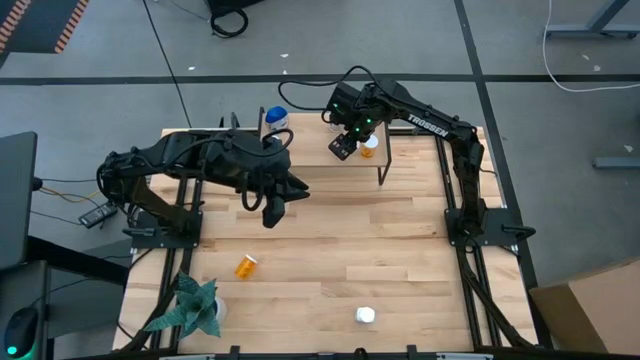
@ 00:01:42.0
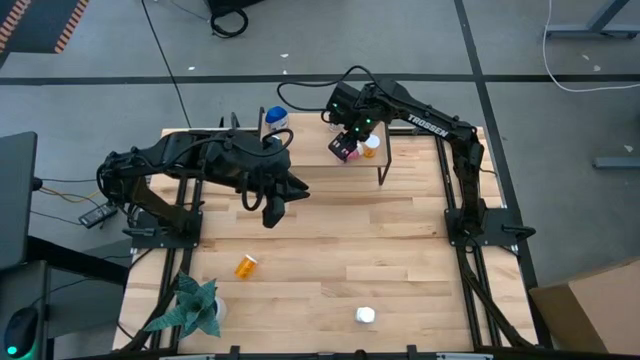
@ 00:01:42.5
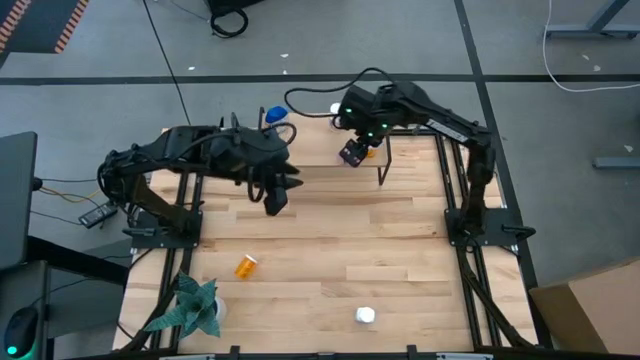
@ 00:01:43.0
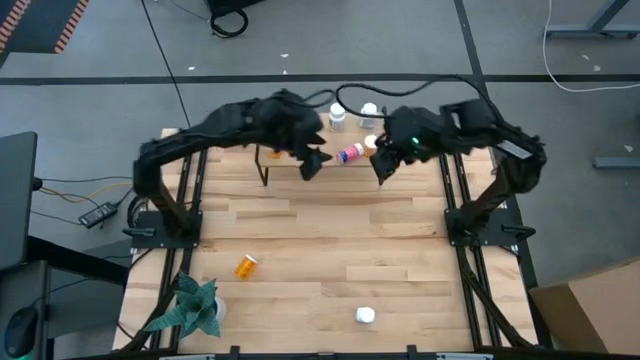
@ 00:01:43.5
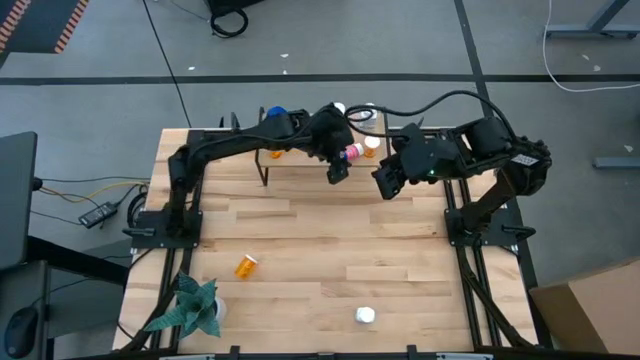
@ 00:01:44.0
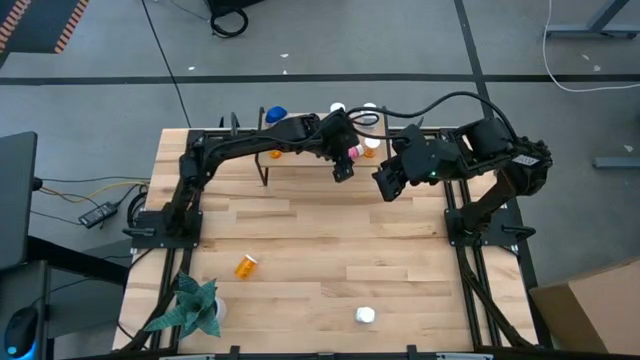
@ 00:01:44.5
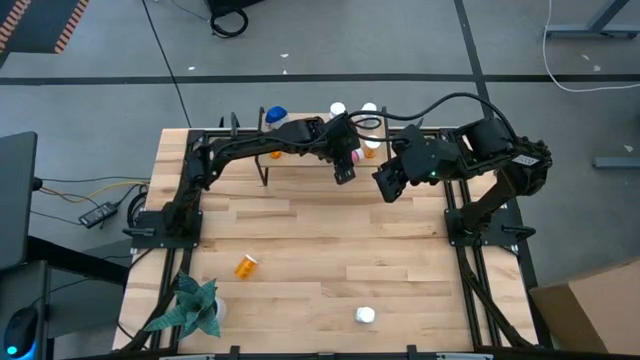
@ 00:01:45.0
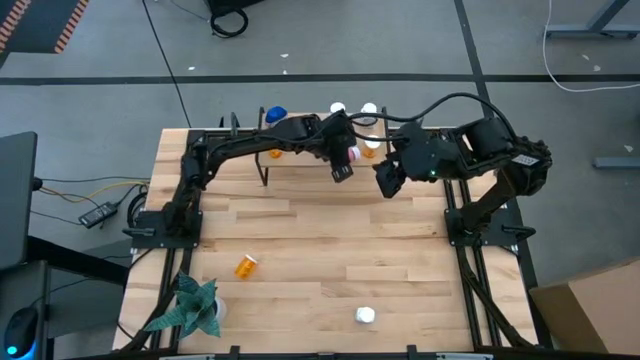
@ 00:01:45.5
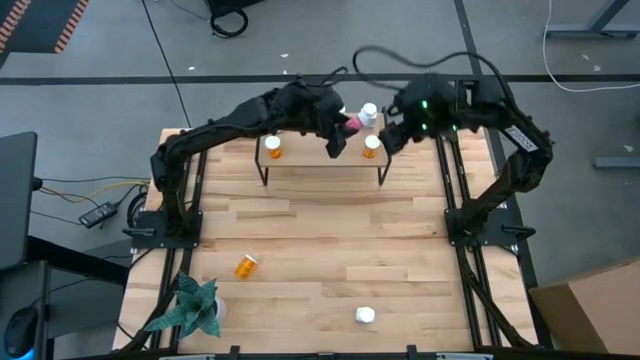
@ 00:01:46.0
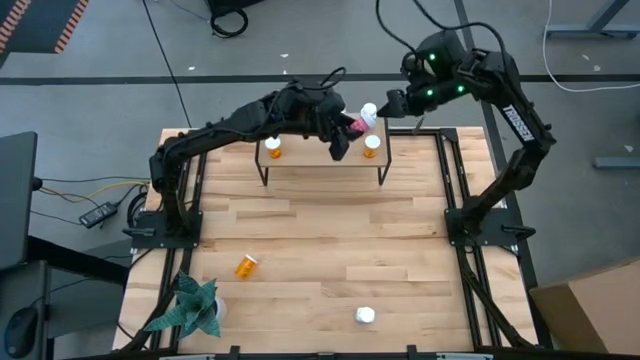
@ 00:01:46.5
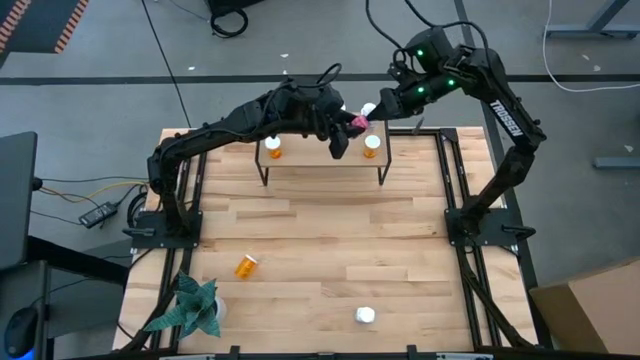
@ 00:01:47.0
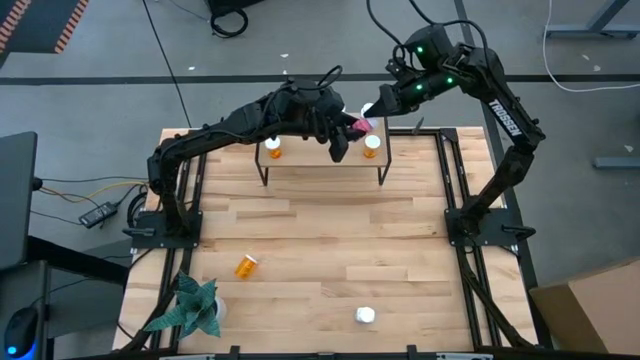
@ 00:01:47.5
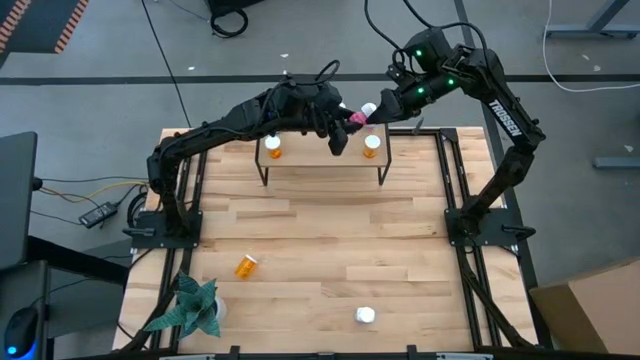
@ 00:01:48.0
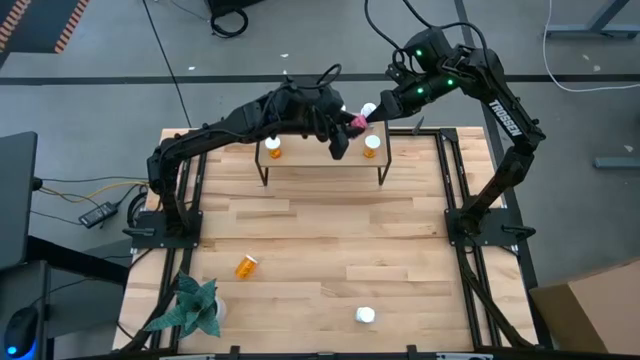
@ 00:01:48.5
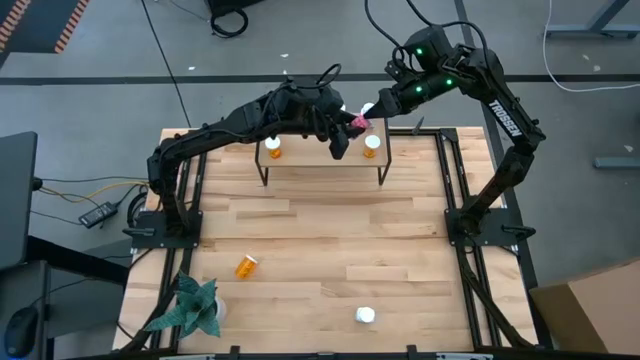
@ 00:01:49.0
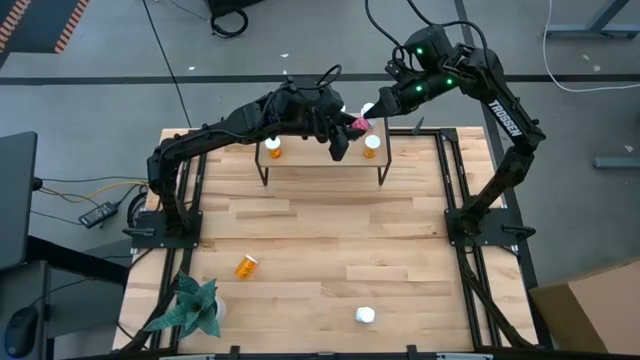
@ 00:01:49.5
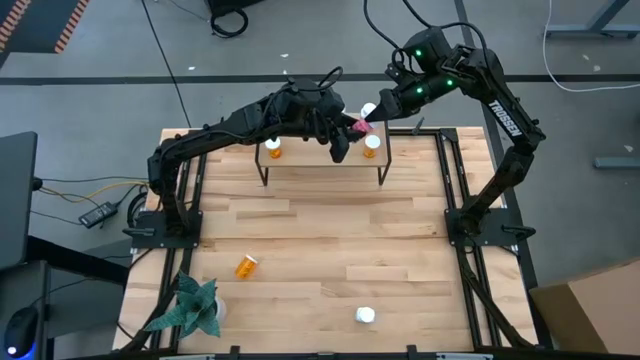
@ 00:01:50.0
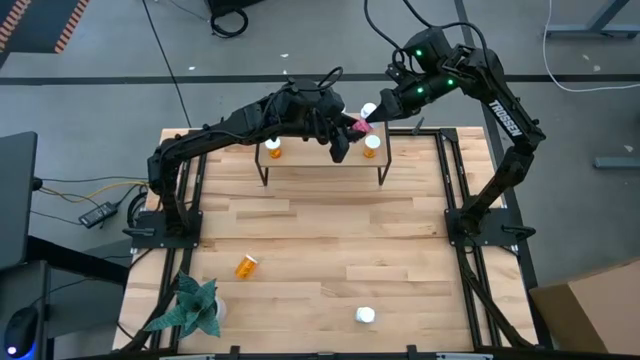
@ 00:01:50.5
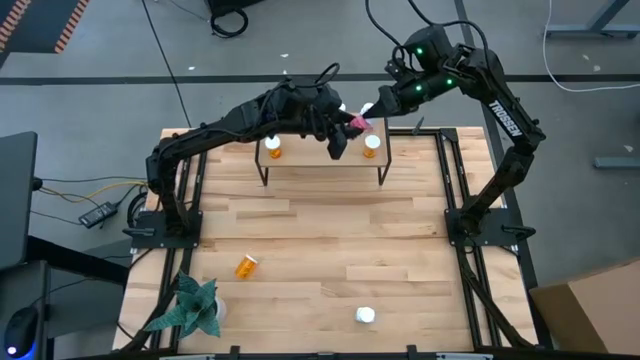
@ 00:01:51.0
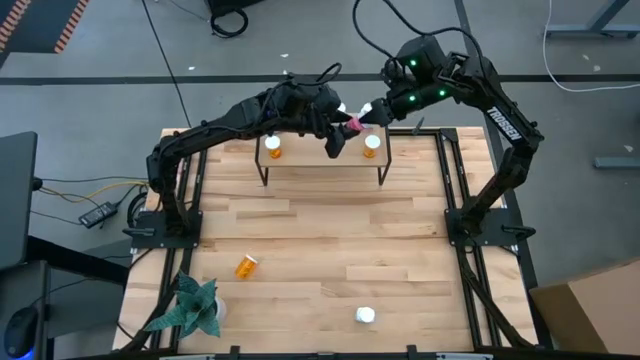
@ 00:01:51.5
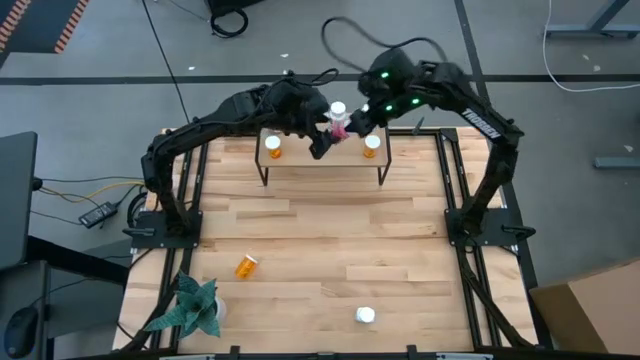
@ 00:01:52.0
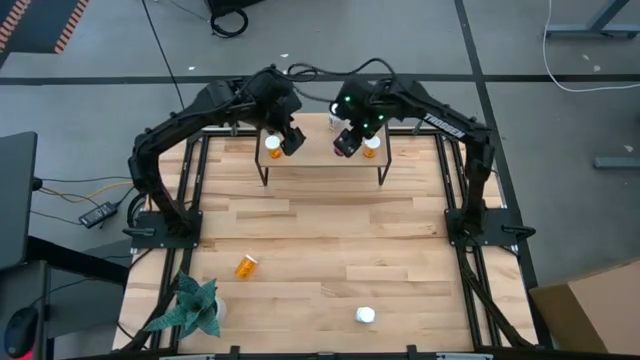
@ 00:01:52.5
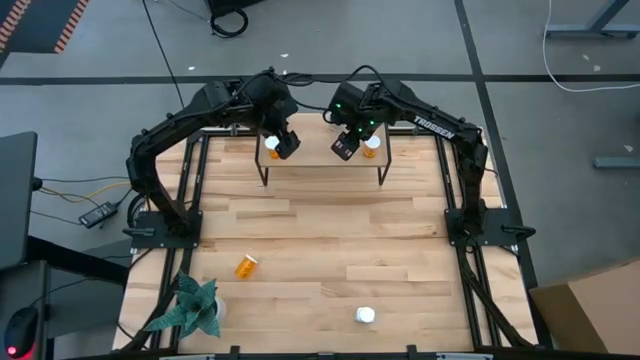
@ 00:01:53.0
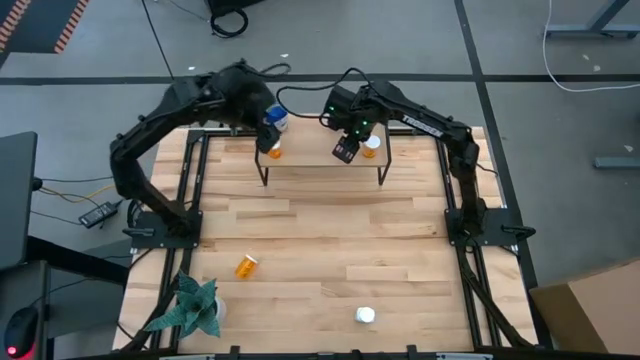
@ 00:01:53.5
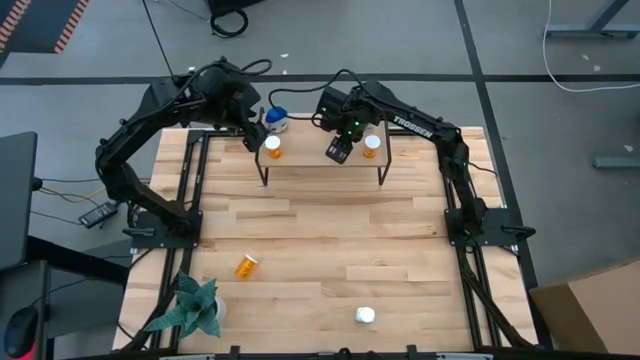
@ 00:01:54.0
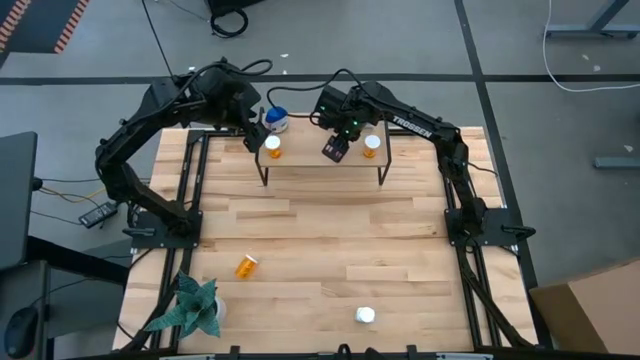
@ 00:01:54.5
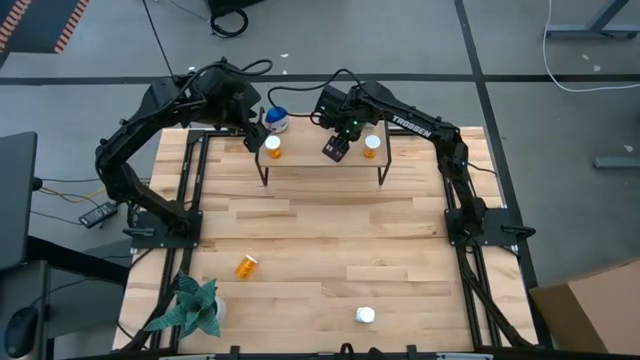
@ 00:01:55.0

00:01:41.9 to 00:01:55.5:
Task: Pick and place medicine bottles onto shelf by color
Put the pink pill bottle on the shelf

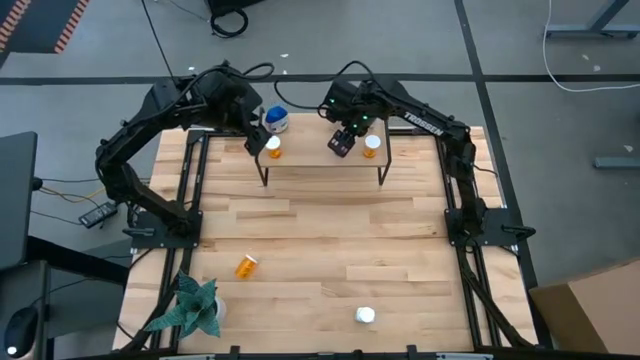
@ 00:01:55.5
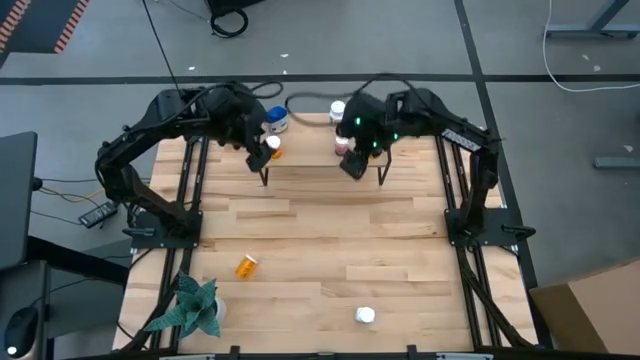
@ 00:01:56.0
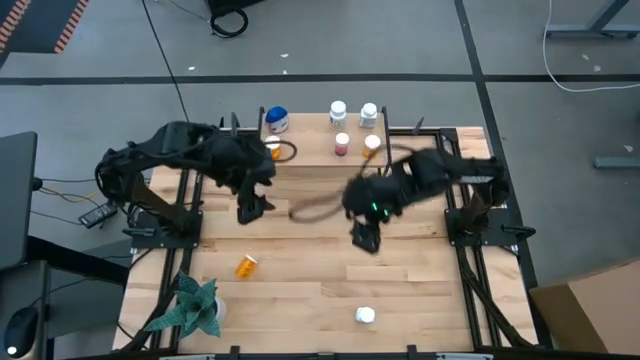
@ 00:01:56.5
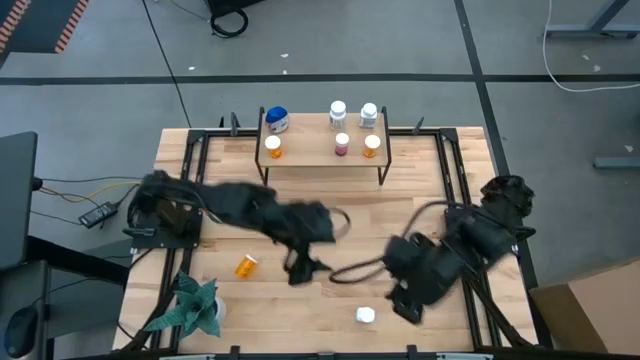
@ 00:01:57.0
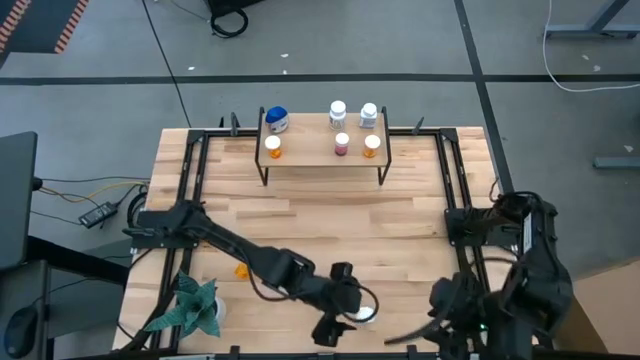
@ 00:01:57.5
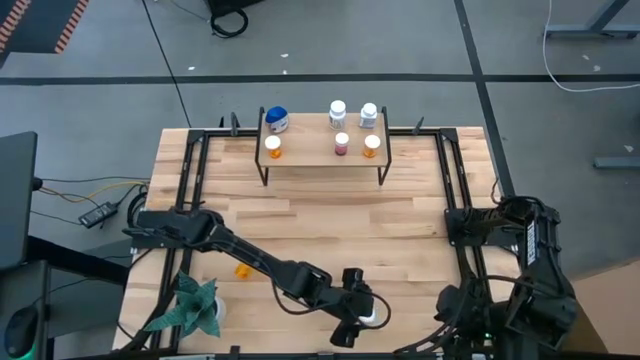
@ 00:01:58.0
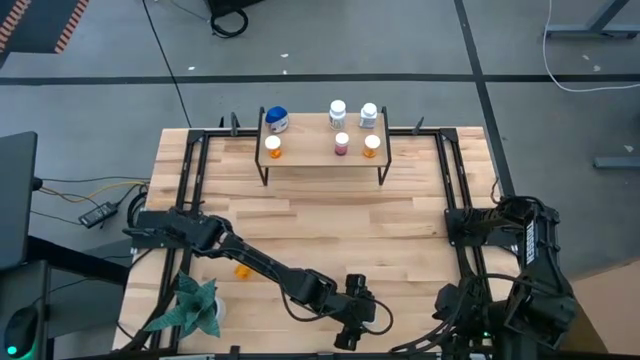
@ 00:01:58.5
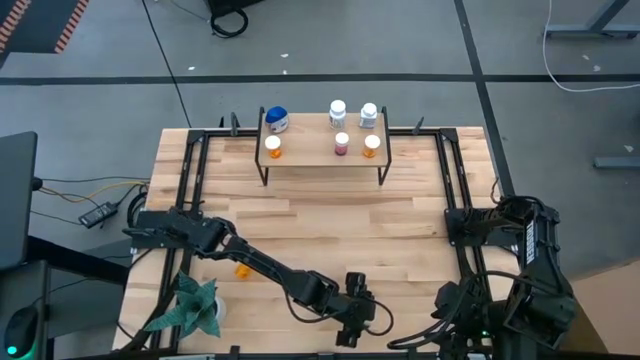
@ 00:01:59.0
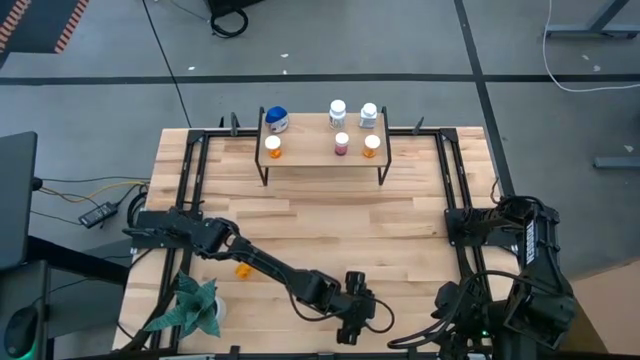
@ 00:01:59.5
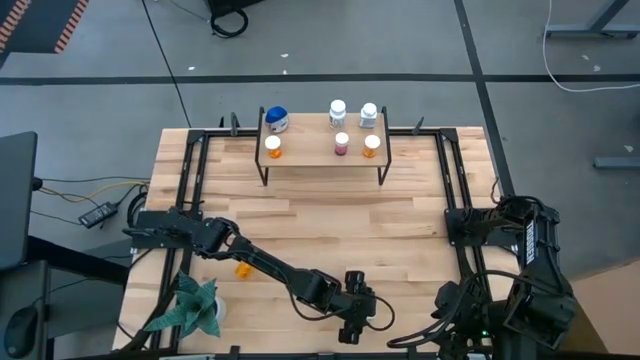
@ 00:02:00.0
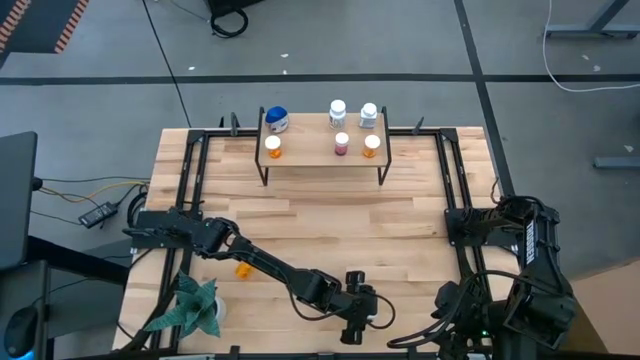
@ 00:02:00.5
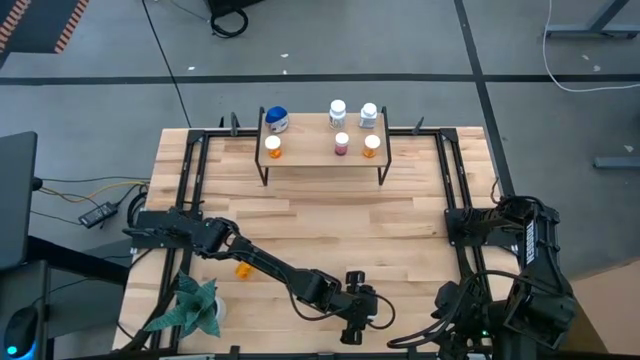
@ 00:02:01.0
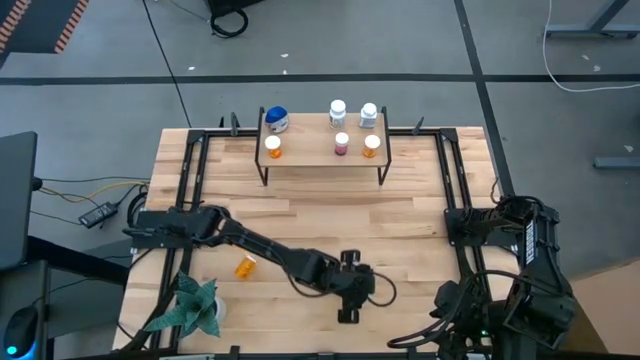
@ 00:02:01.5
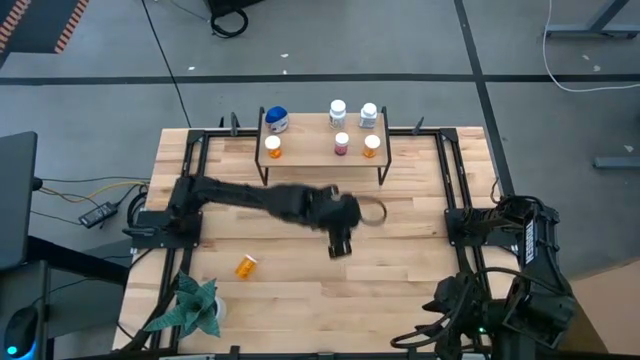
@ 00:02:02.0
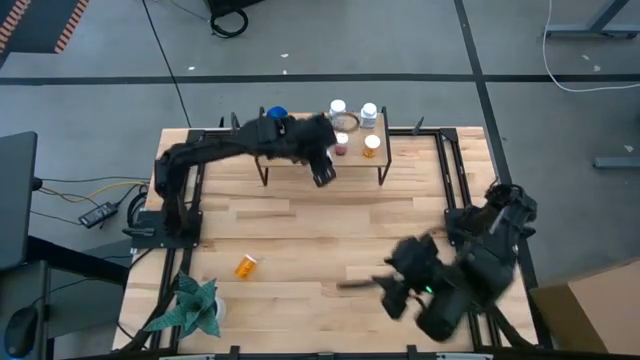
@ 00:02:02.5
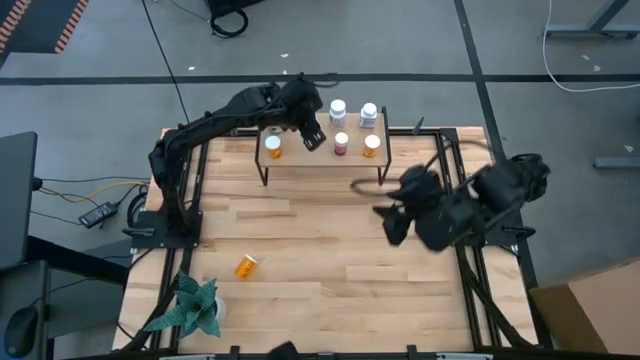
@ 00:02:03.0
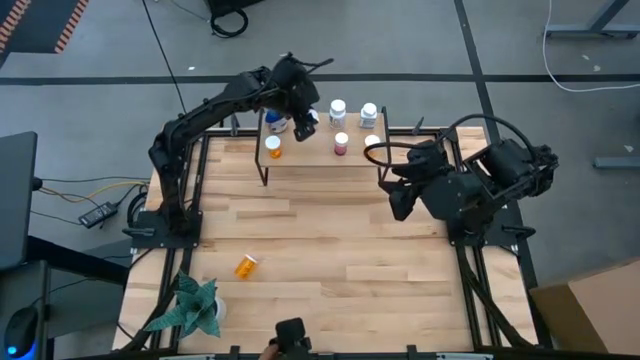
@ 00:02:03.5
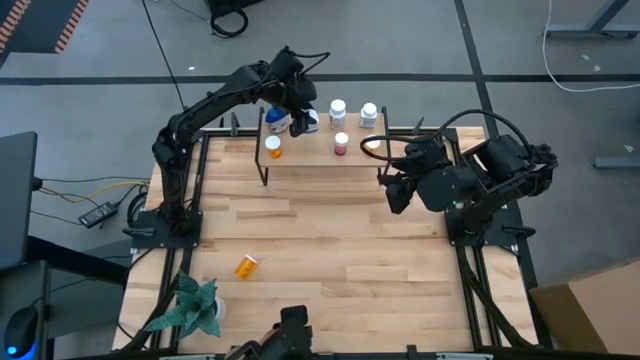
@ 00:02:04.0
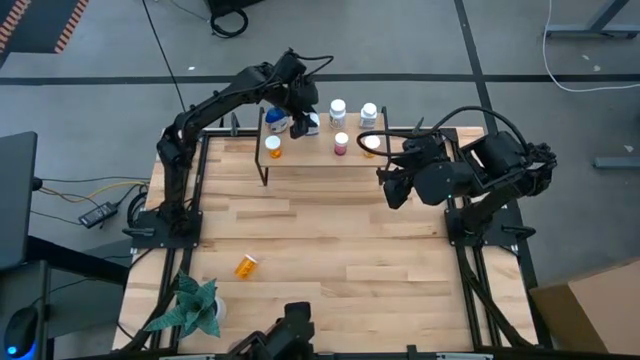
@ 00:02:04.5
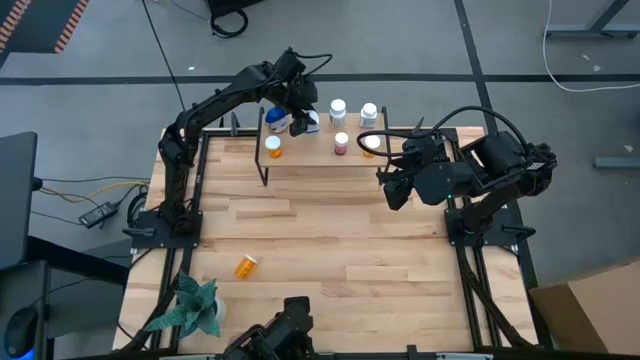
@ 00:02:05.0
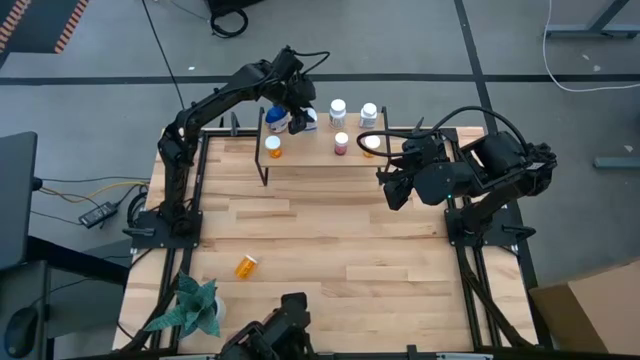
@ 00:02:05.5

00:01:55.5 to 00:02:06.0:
Put the white medicine bottle on the shelf
